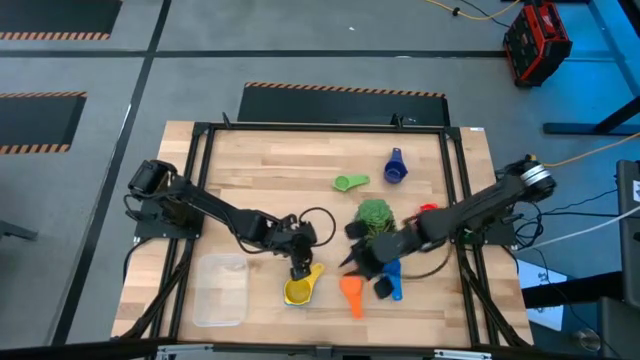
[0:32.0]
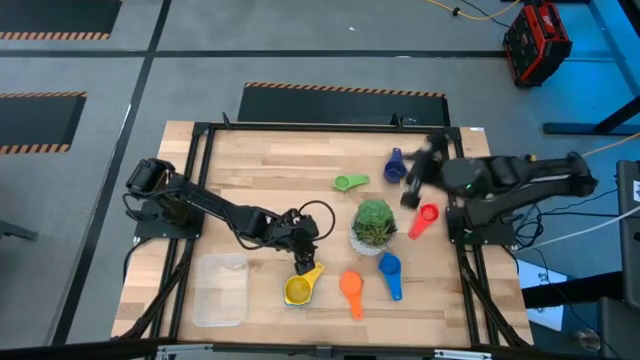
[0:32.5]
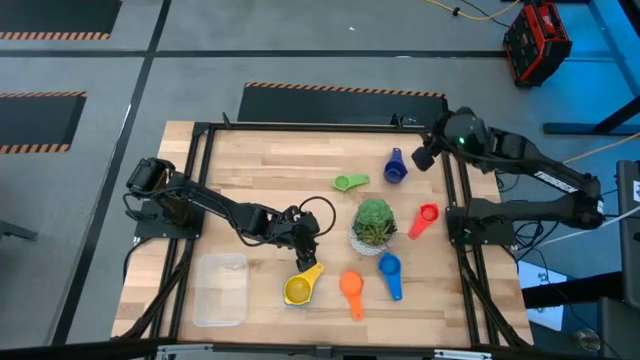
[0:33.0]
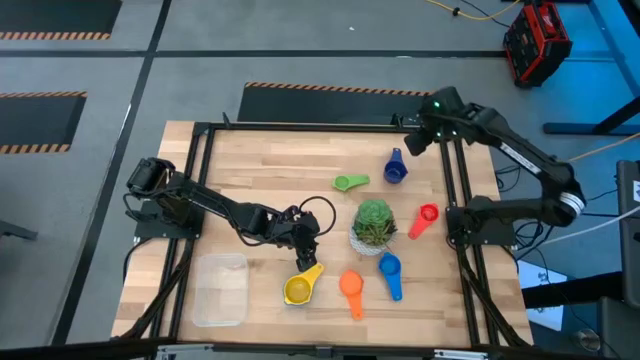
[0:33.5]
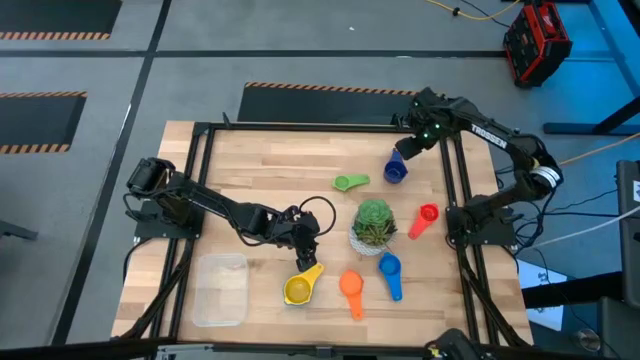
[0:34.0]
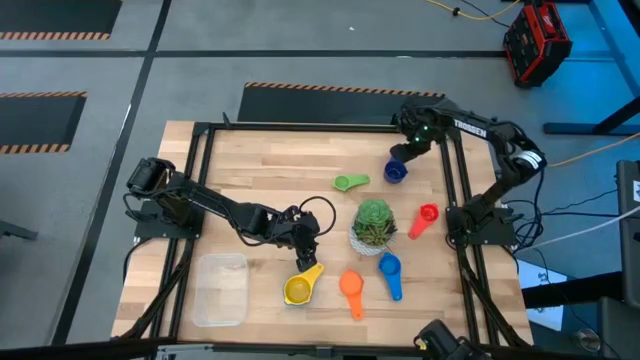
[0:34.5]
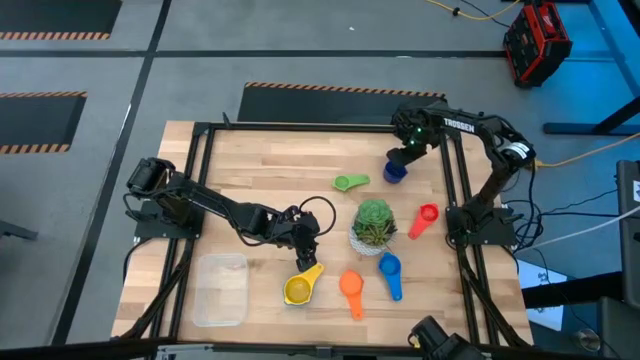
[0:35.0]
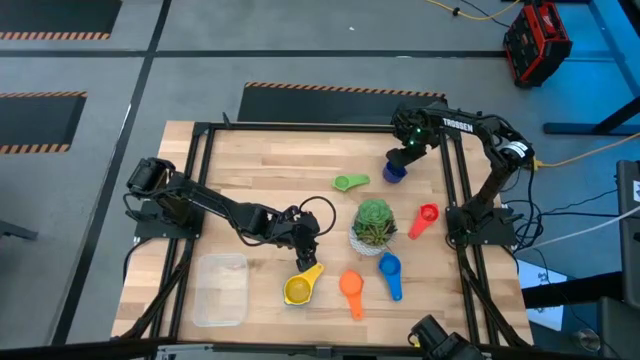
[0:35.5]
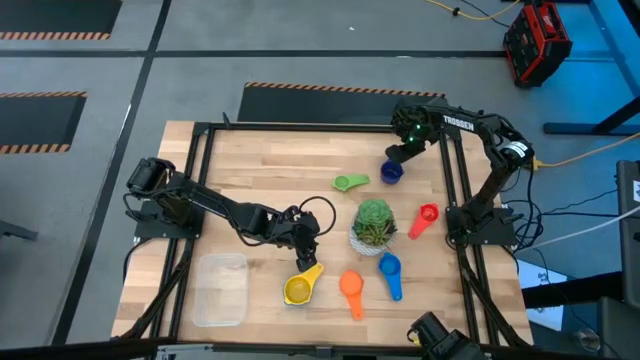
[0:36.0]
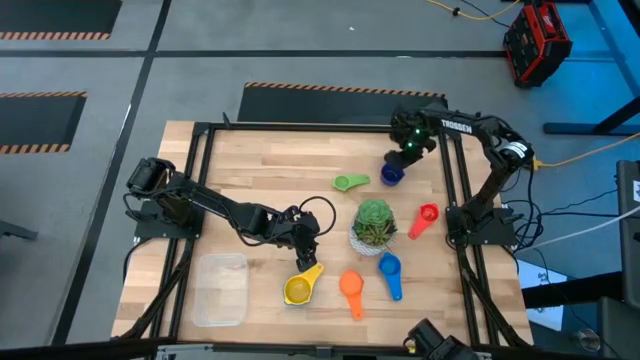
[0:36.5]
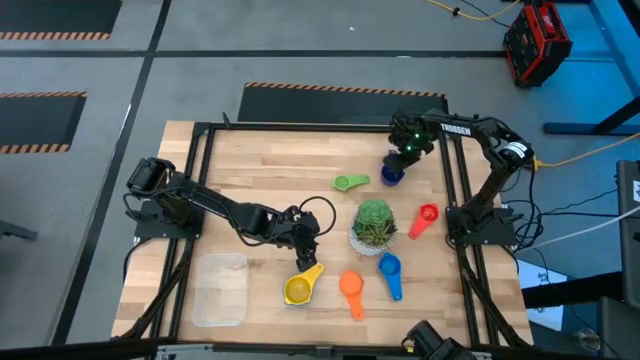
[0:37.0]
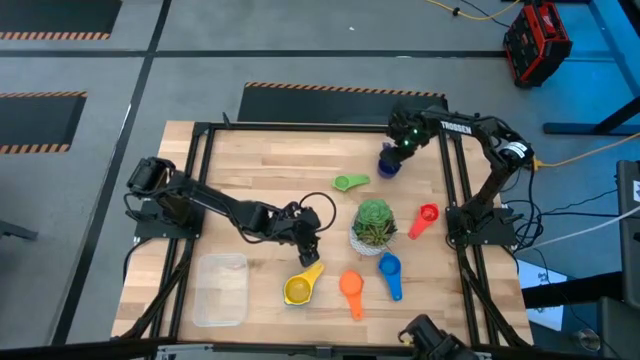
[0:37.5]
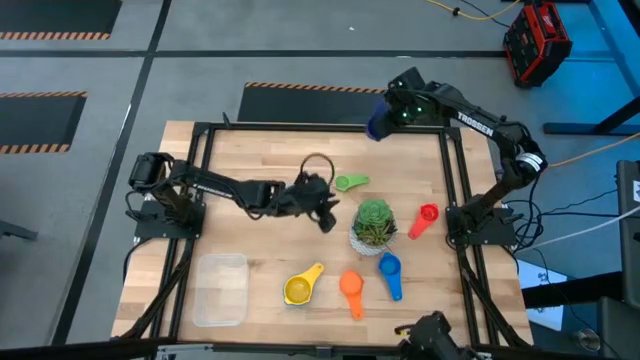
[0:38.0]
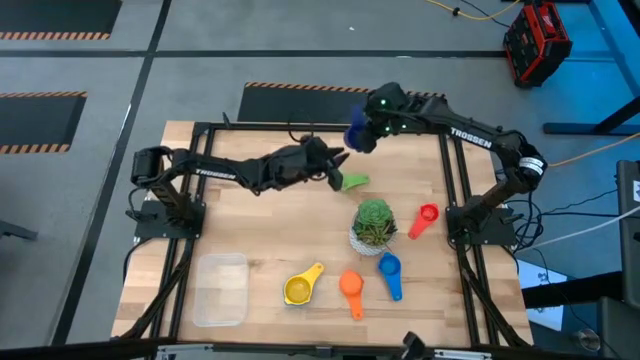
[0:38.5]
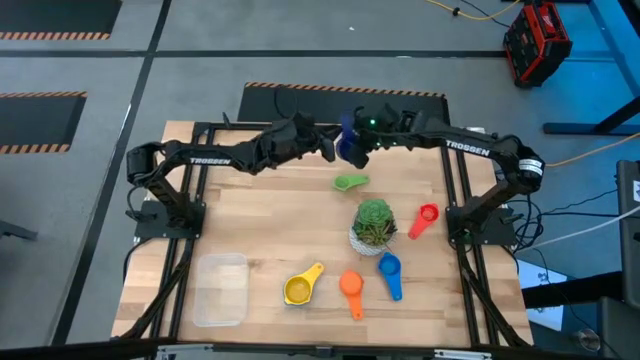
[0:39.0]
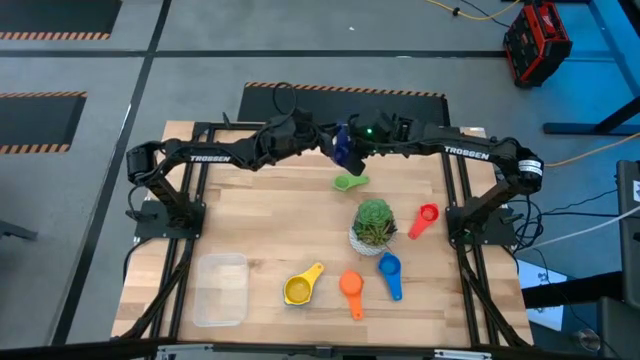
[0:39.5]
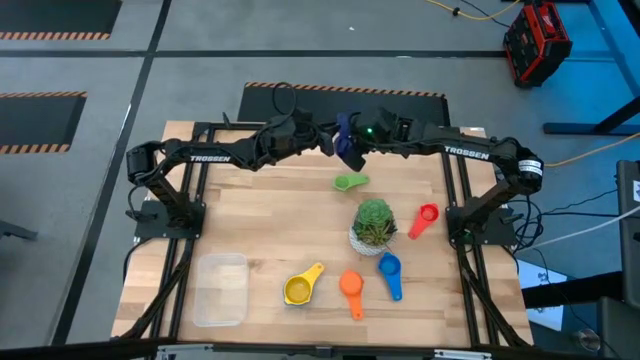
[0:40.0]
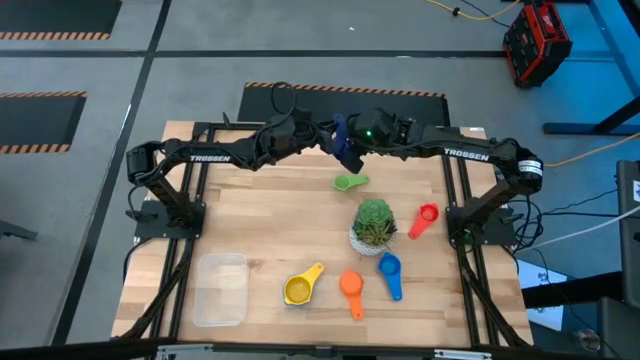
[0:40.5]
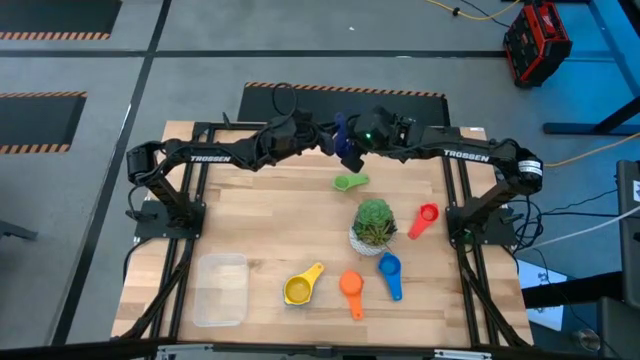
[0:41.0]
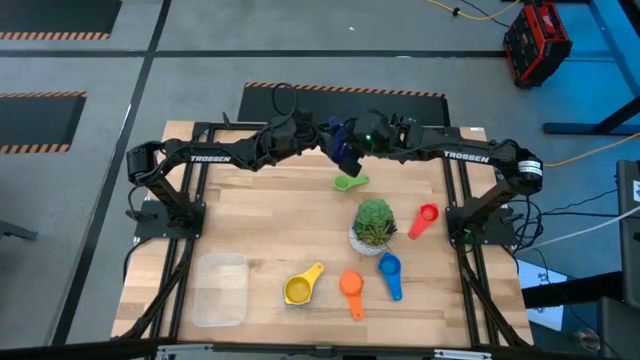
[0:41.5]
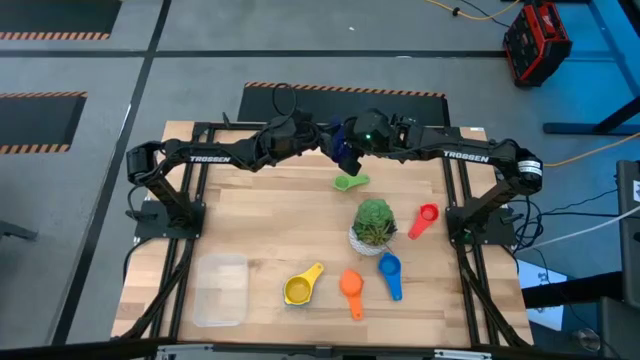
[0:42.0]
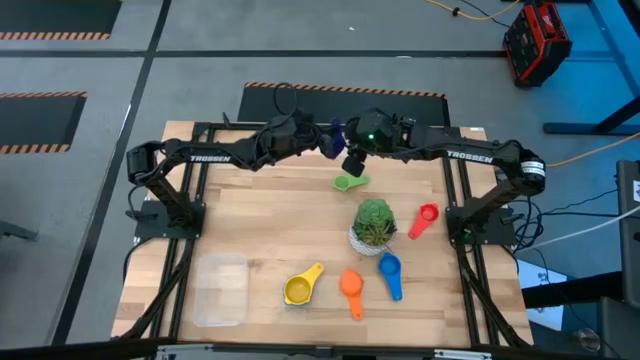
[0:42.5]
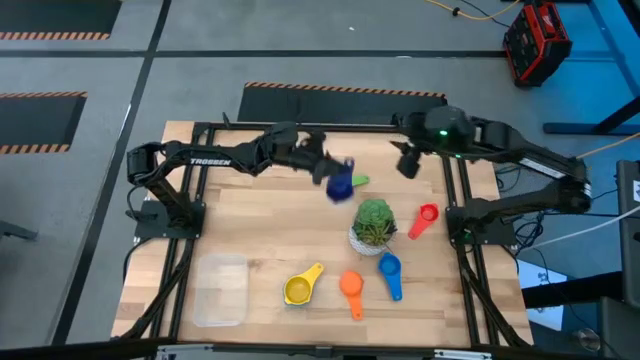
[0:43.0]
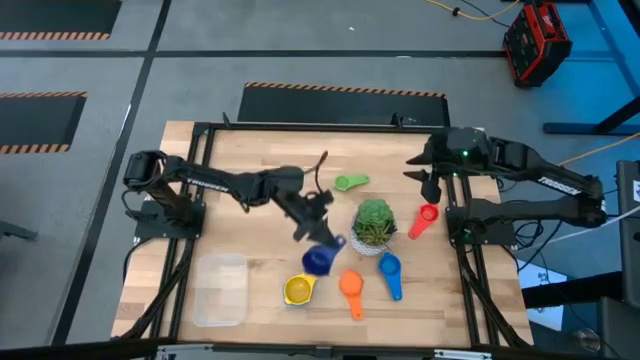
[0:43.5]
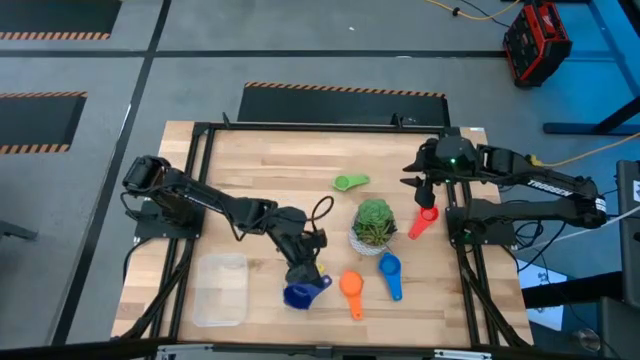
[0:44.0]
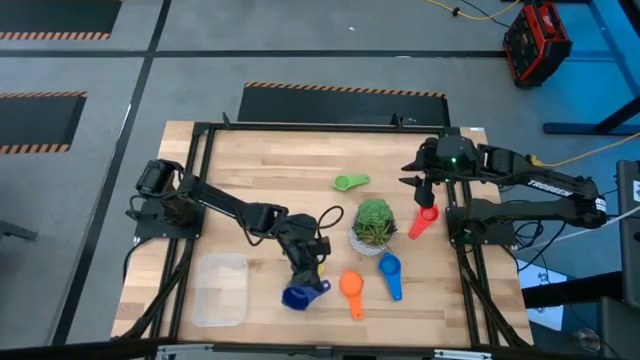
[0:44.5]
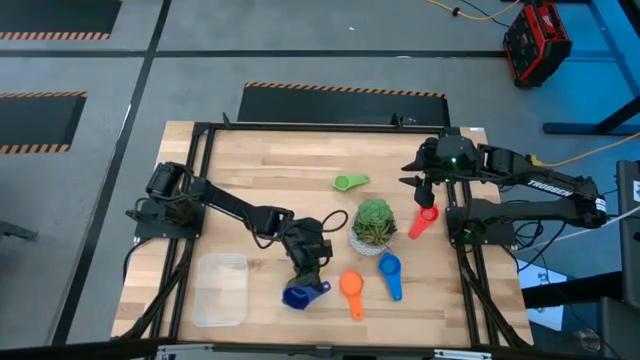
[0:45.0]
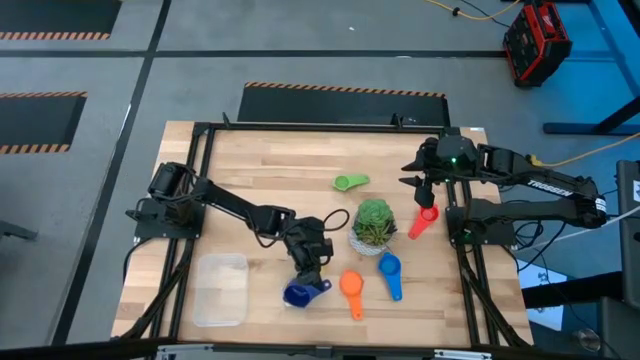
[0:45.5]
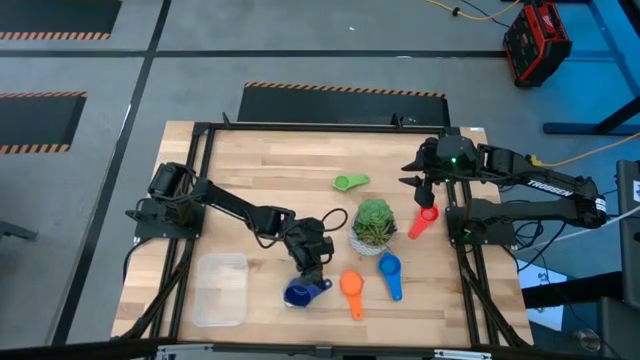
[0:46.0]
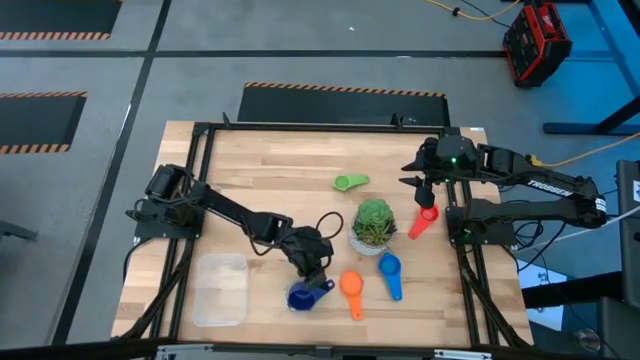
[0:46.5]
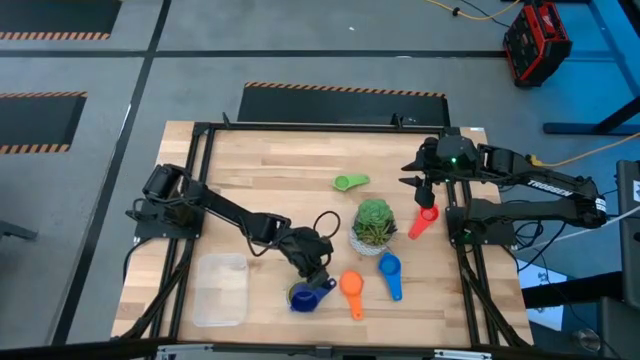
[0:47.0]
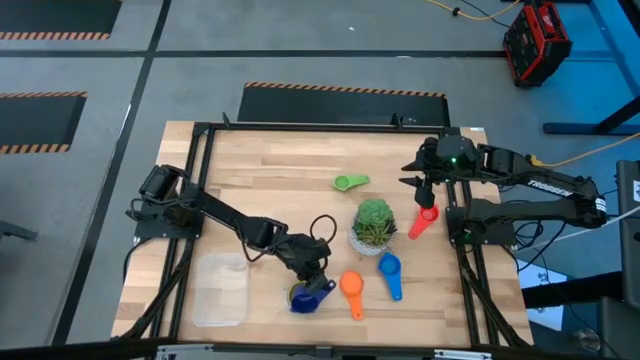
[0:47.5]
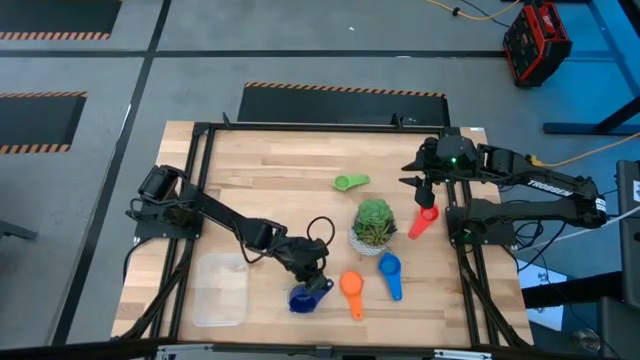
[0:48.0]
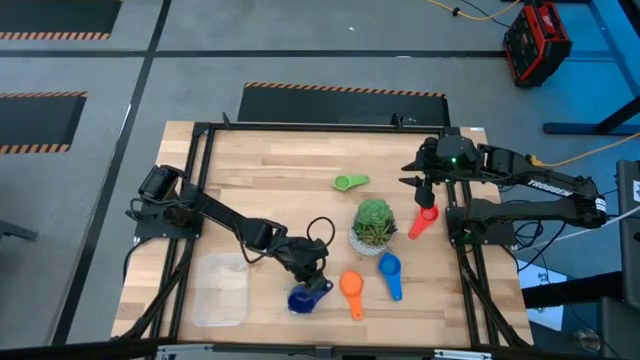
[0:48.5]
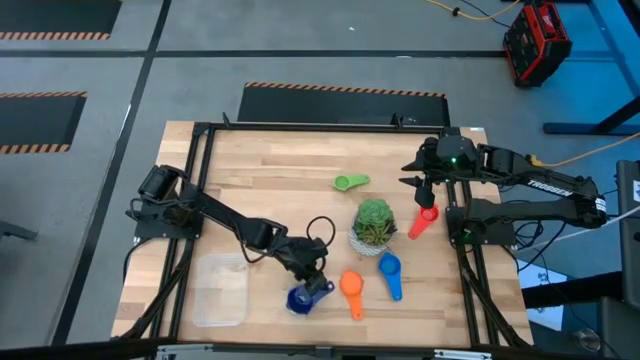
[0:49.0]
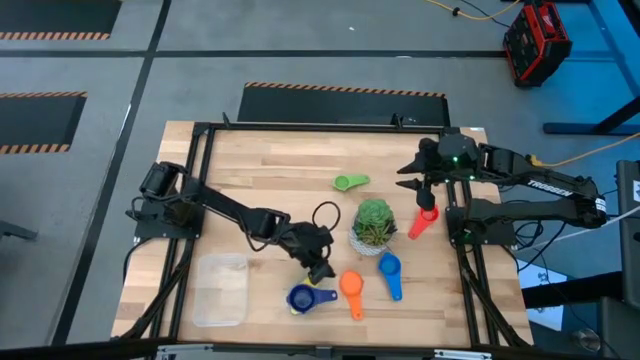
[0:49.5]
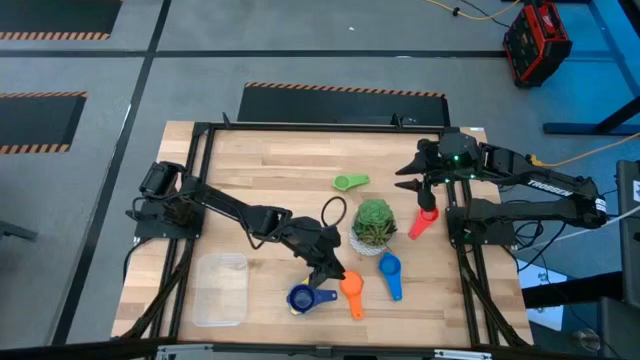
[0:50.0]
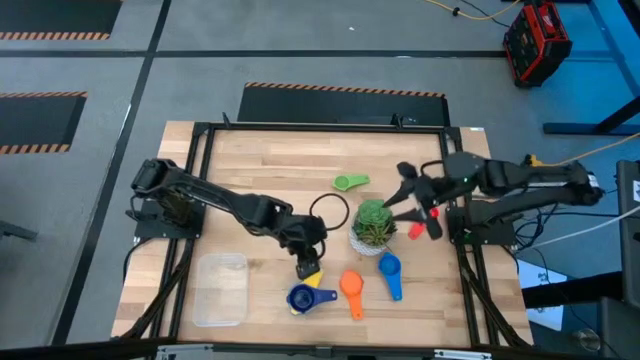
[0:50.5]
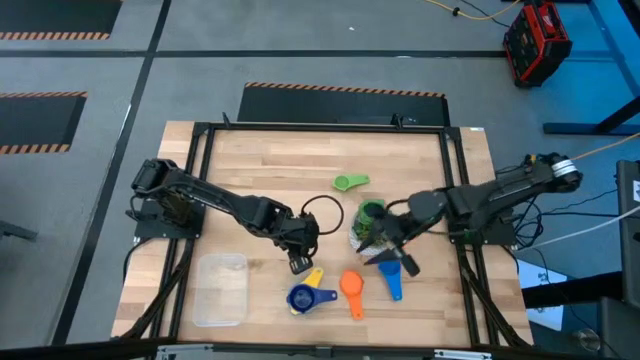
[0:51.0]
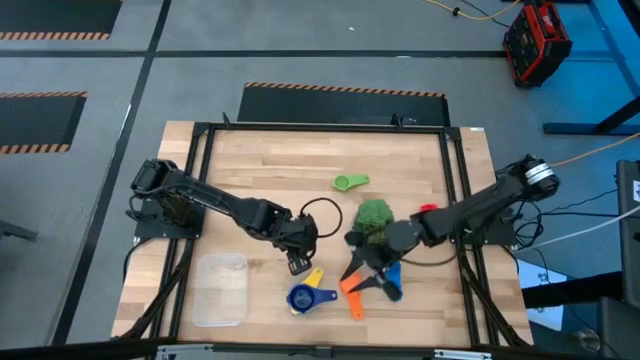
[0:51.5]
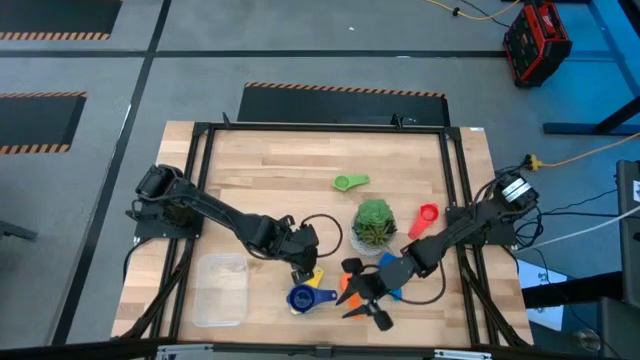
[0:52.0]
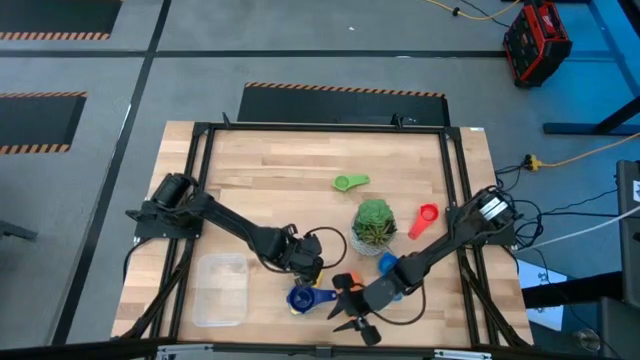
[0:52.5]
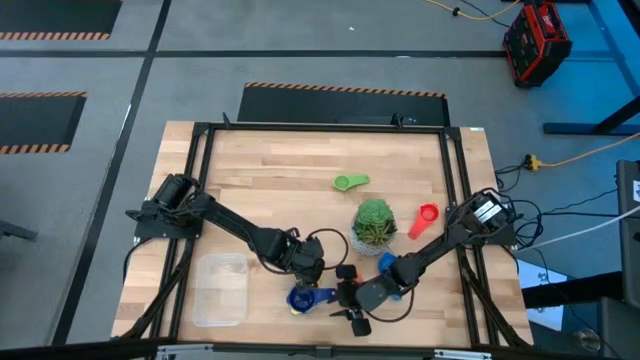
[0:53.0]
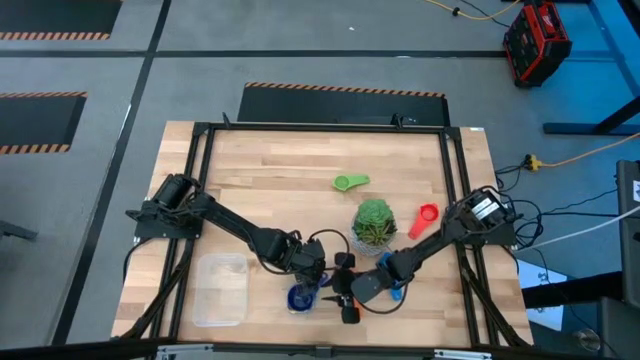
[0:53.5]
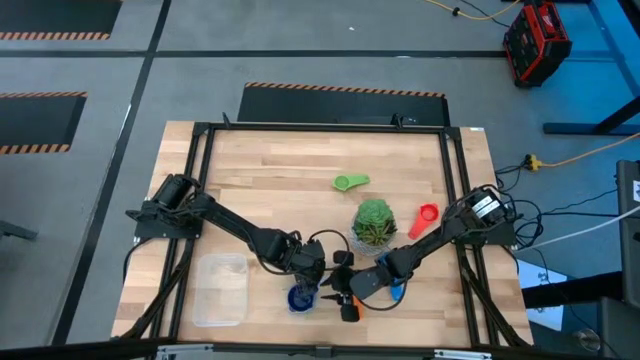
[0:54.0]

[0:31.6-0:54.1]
Task: Nest measuring cups in basket
Stack the dark blue measuring cup on top of the yellow measuring cup
